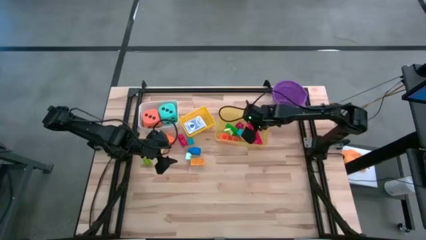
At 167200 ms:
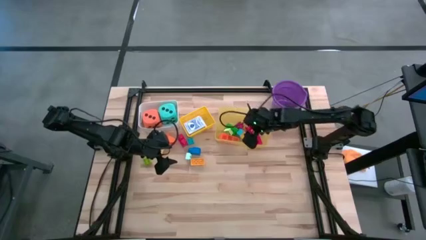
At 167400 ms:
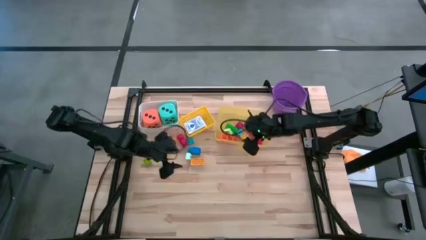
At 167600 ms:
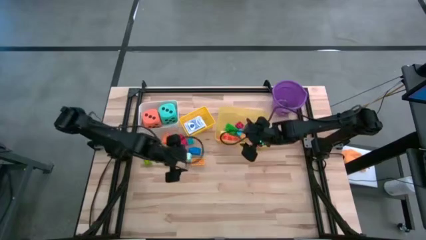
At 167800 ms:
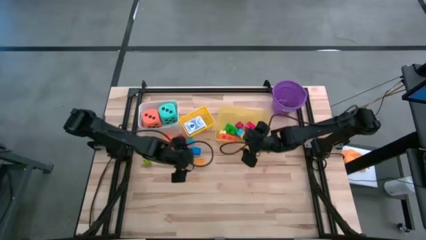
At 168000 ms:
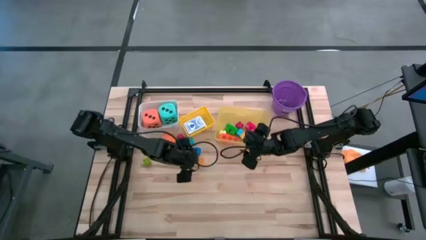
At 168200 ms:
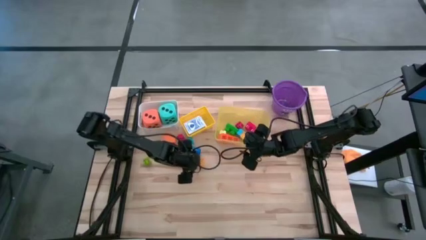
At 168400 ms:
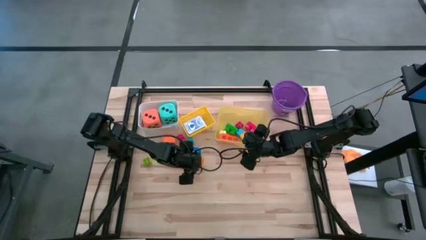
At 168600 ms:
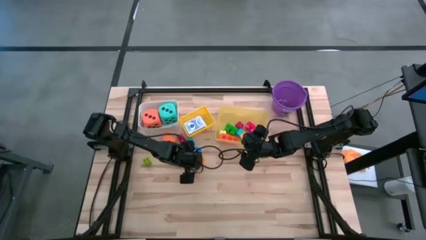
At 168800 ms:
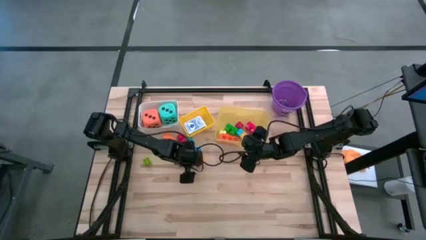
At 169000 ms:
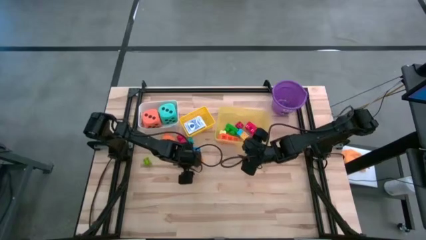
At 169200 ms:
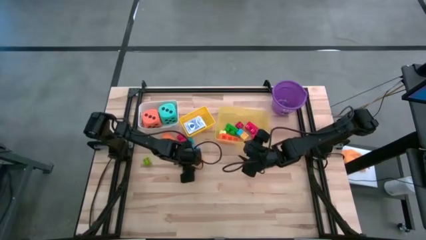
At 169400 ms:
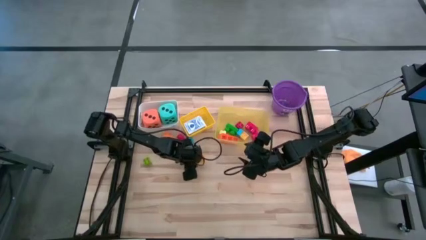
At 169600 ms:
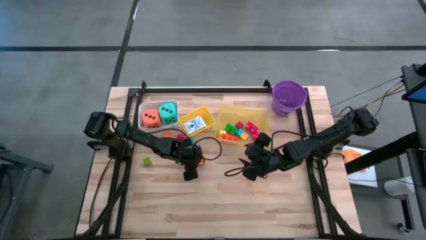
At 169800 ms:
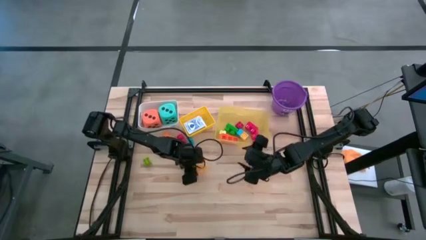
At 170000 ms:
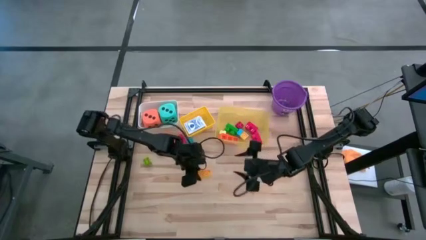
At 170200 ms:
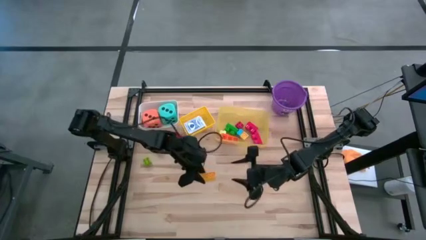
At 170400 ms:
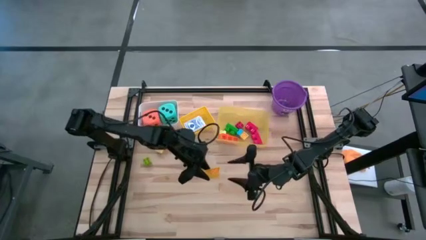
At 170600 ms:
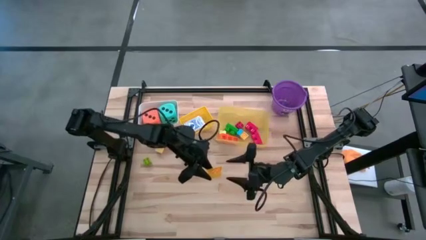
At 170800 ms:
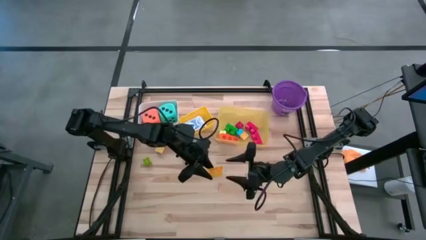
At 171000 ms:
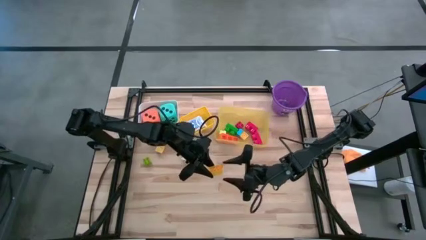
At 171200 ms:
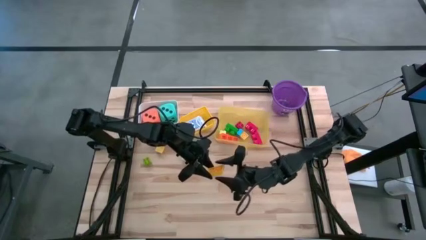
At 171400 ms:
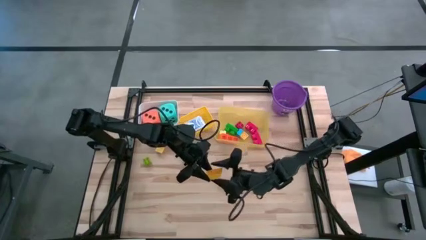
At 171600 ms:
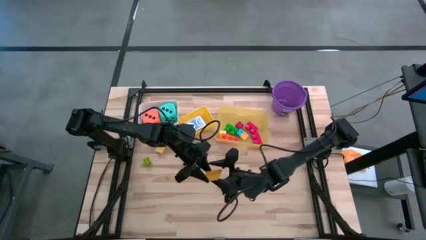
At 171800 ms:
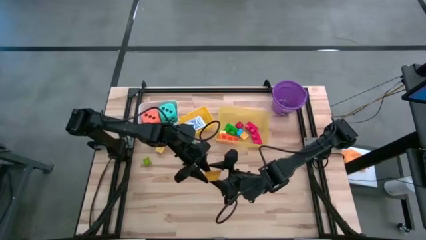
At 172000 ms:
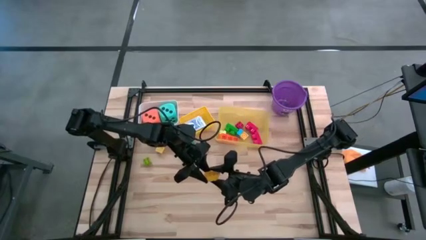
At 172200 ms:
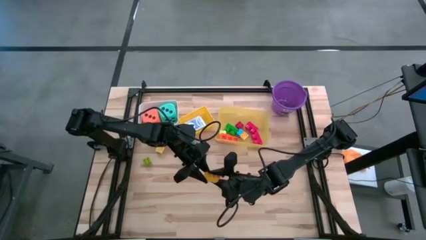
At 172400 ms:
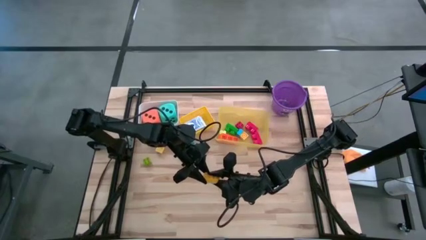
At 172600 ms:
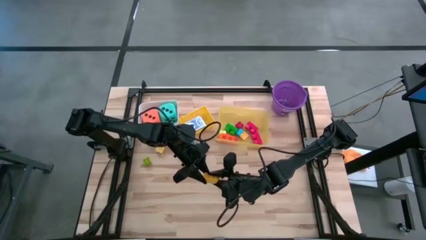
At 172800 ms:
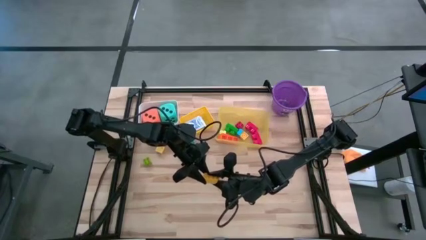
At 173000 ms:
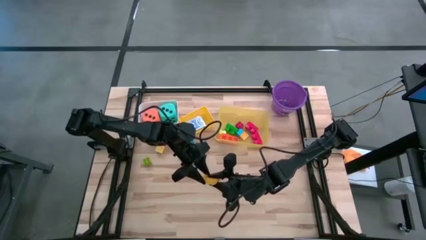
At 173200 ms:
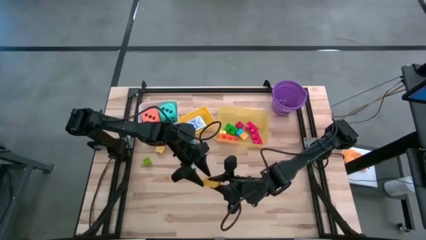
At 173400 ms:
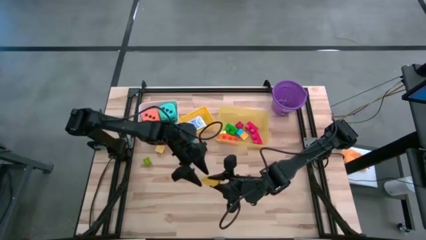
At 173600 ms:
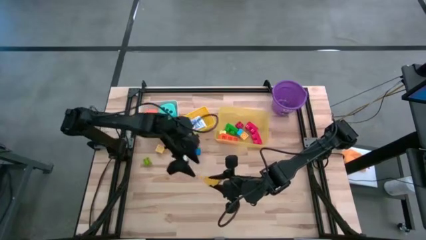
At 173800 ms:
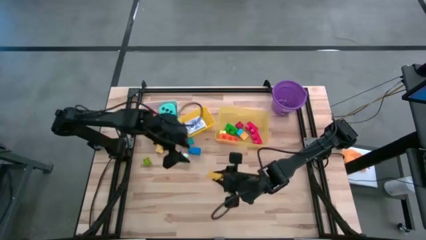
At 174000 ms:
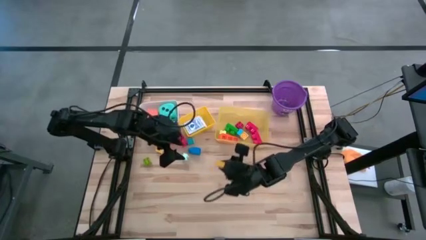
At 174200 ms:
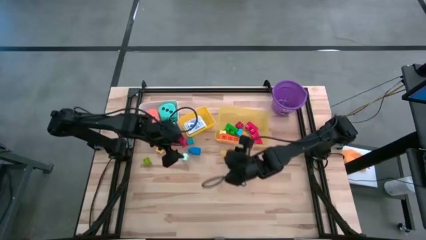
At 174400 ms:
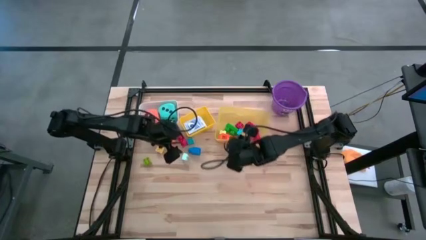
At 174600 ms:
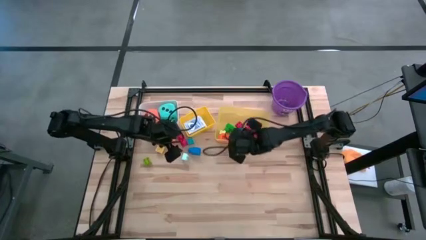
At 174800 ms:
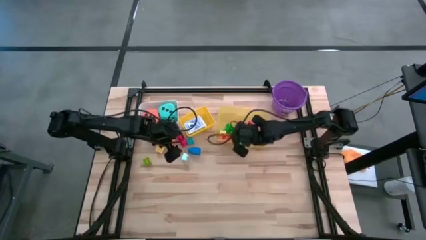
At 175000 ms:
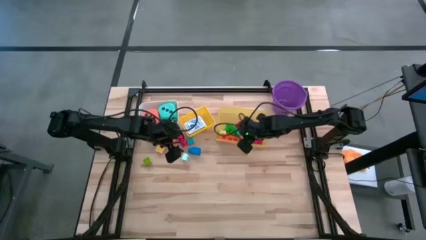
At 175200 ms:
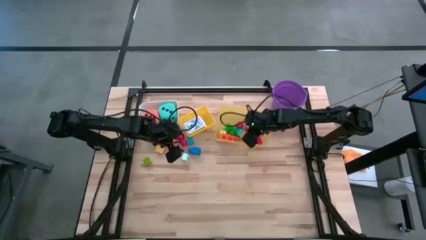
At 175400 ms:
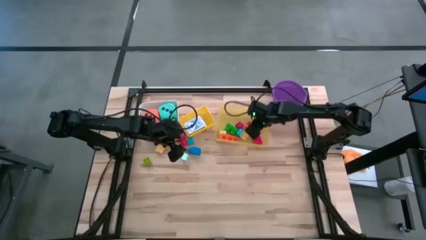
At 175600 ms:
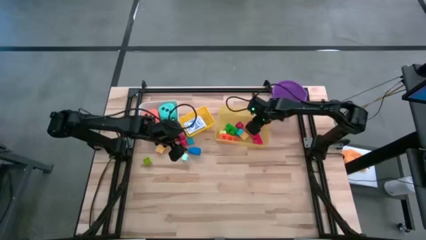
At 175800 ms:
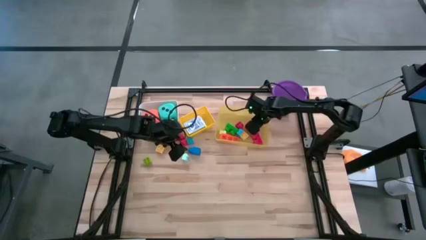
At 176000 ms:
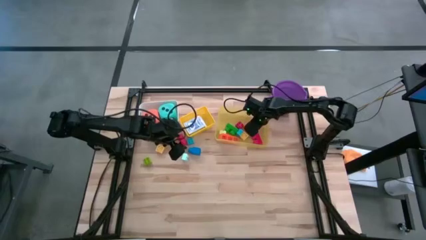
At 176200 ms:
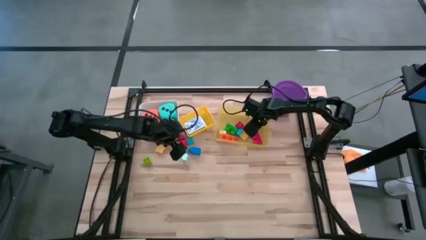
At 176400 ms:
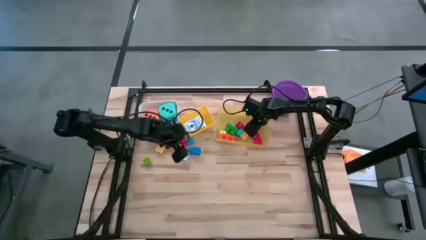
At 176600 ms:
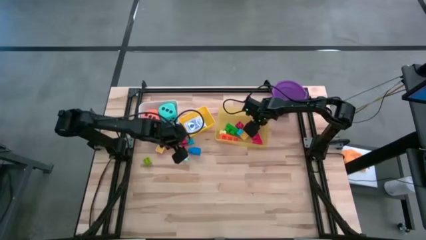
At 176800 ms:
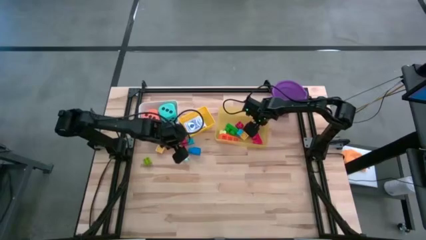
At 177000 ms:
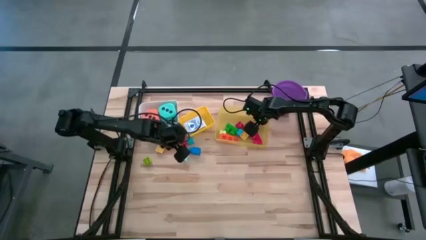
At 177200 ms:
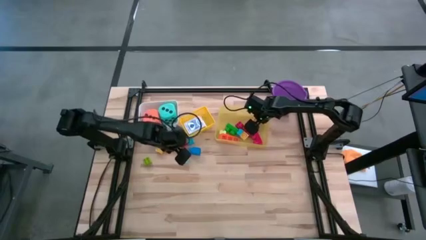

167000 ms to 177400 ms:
Task: Pick & Place Toys
Put the dark yellow game piece into the yellow bin

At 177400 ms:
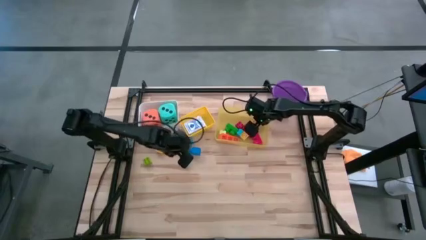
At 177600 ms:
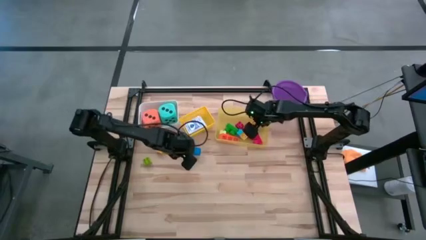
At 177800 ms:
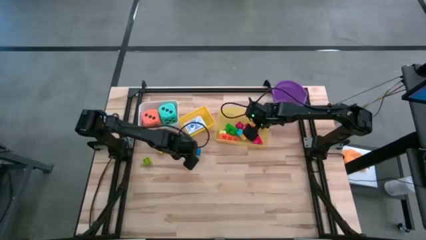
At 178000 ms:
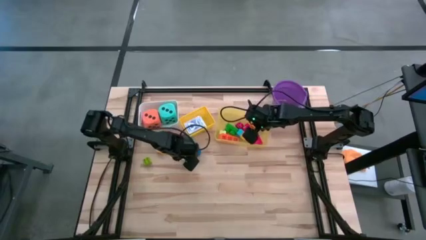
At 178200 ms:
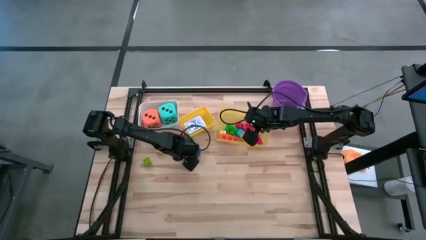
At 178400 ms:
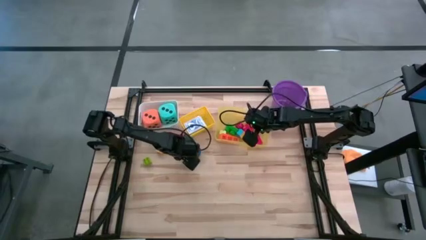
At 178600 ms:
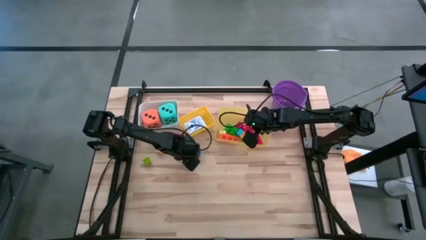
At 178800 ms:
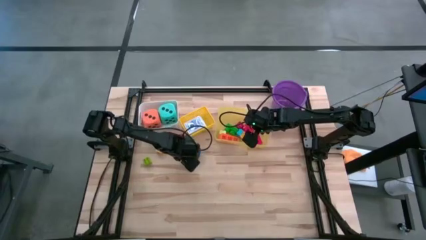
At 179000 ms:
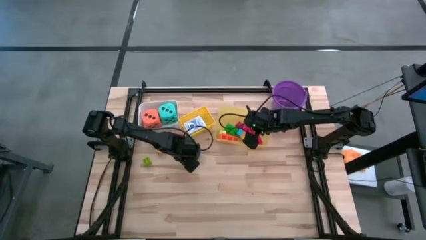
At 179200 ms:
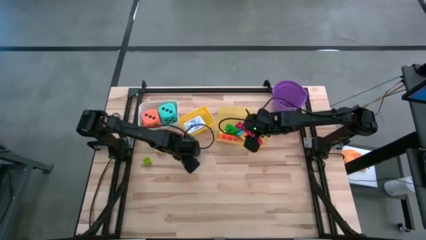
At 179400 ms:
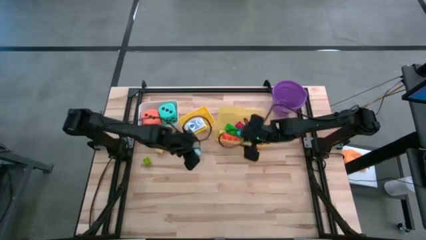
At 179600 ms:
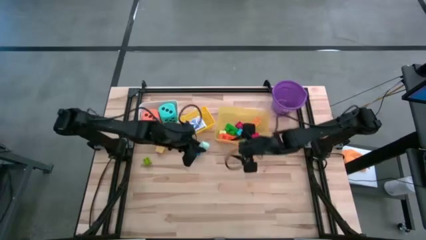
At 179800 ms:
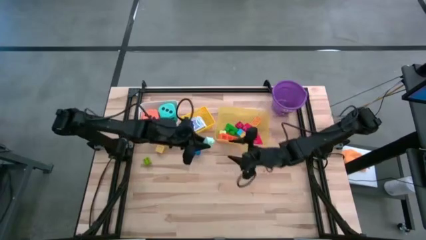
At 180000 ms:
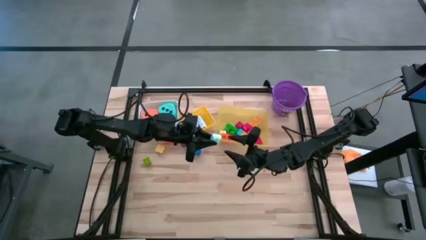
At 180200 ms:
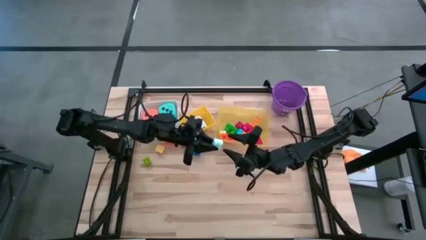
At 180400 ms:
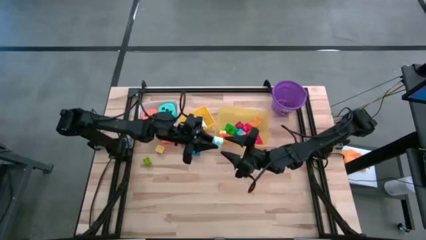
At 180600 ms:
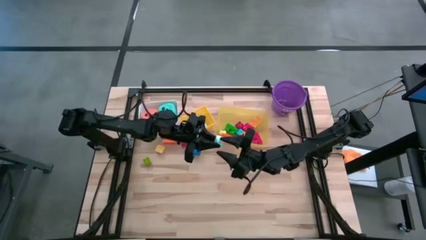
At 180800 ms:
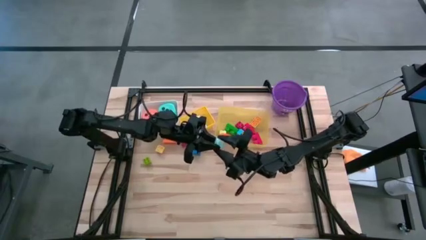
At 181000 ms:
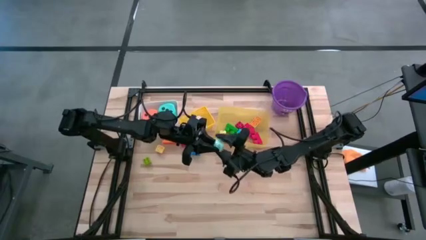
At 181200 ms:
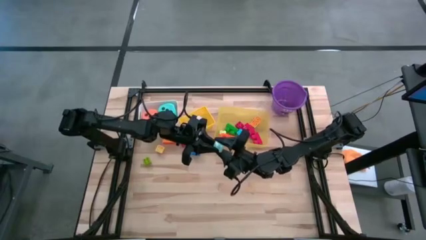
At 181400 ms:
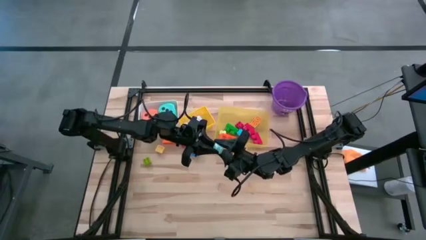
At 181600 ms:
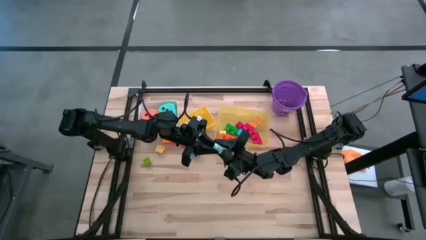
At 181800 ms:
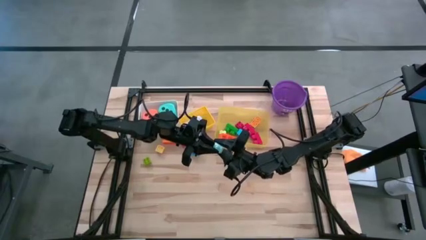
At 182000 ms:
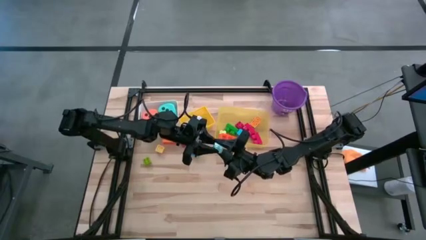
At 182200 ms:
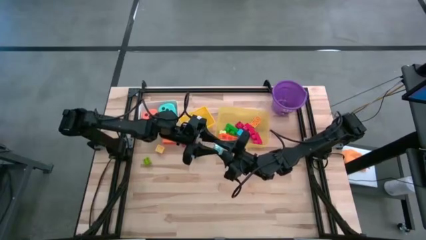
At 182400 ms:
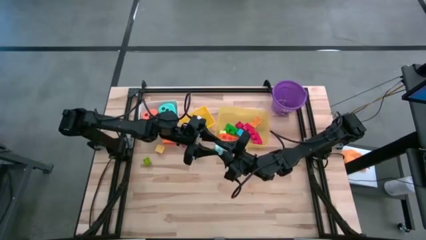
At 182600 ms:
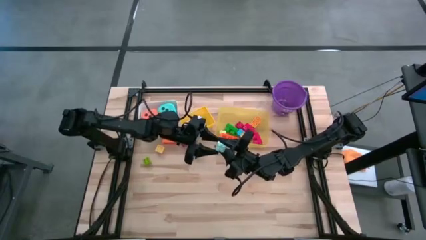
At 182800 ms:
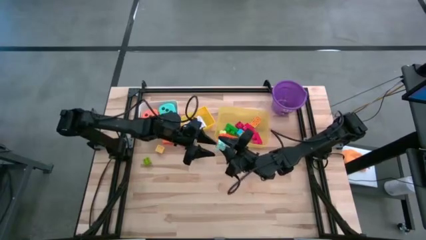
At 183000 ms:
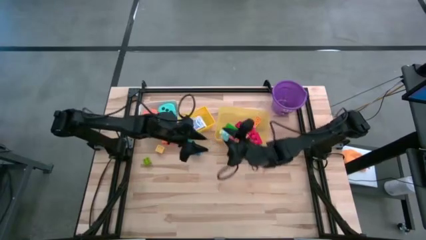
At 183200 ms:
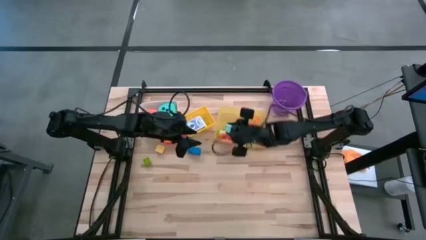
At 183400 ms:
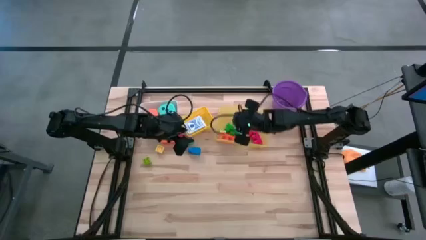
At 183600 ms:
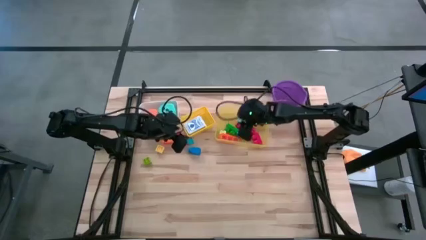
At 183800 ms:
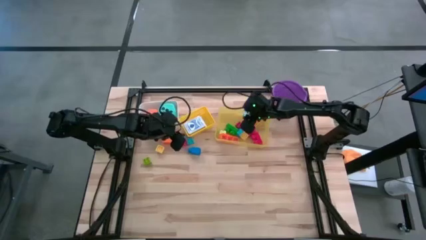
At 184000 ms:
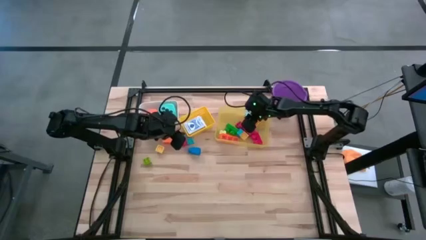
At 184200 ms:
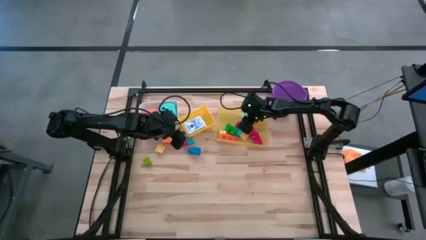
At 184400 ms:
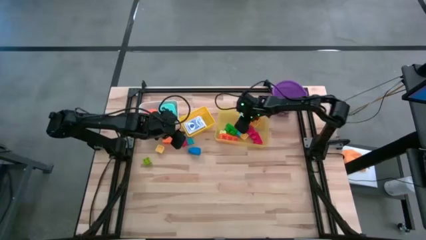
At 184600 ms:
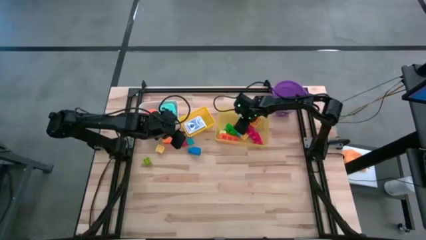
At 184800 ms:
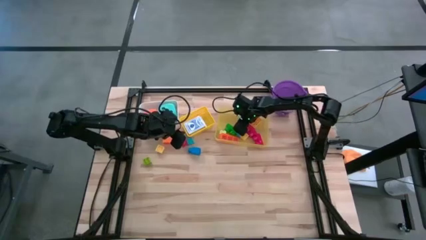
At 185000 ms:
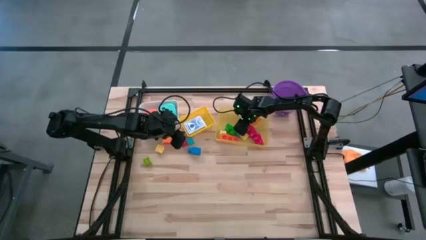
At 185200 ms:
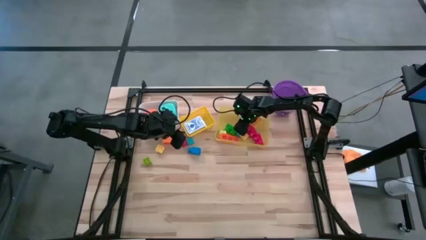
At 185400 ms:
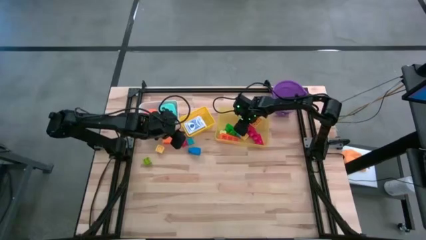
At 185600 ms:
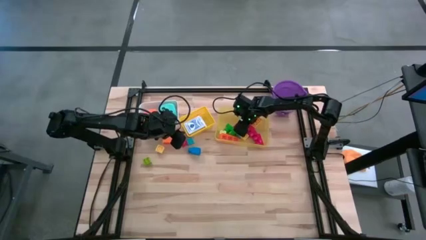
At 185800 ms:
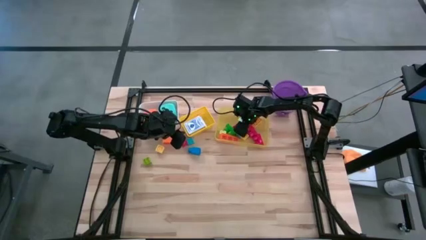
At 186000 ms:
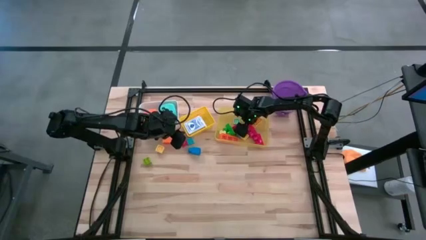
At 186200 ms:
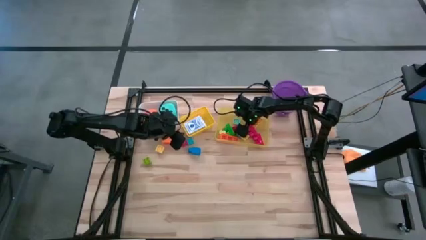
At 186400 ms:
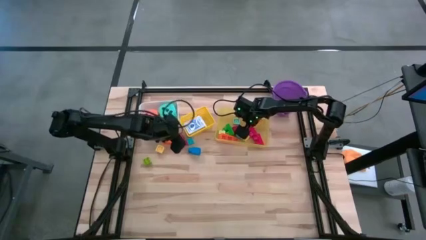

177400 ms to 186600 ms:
Put the light blue game piece into the yellow bin
